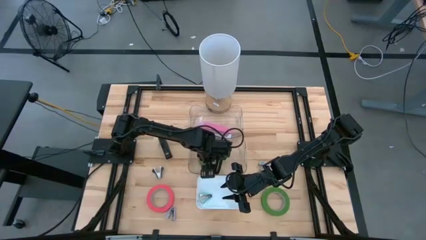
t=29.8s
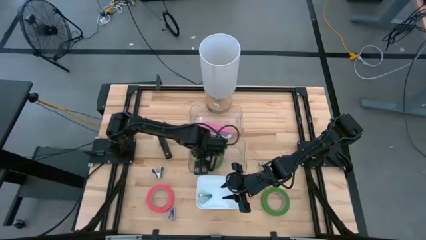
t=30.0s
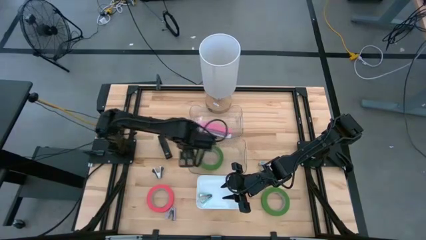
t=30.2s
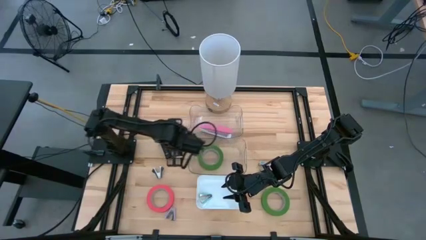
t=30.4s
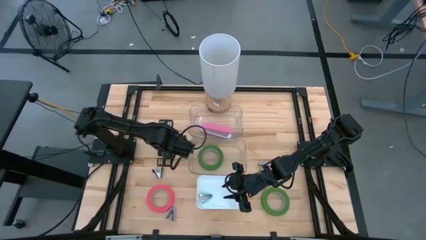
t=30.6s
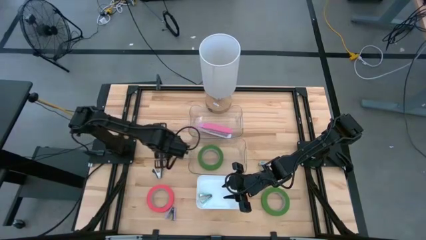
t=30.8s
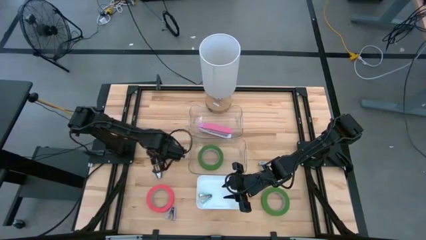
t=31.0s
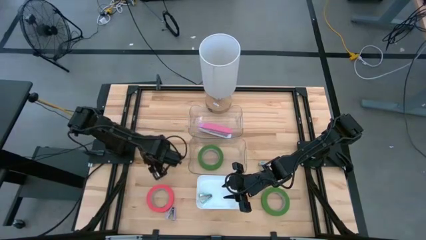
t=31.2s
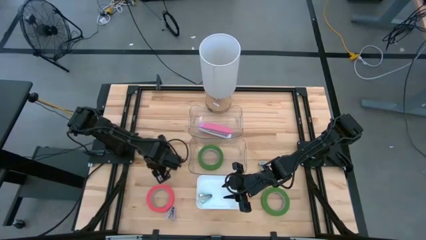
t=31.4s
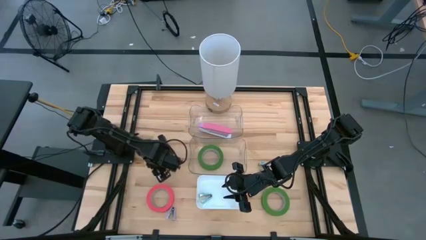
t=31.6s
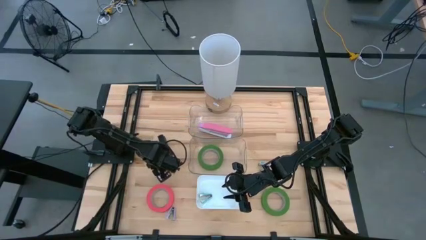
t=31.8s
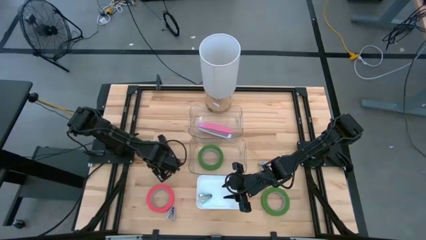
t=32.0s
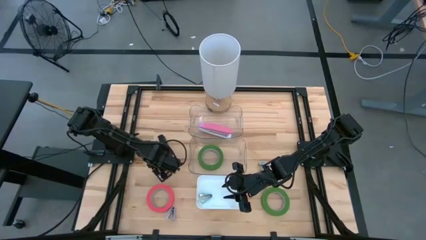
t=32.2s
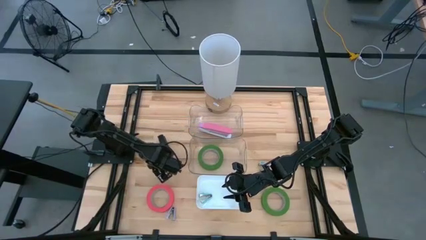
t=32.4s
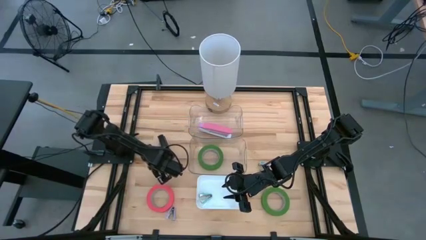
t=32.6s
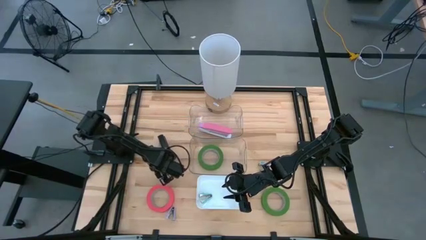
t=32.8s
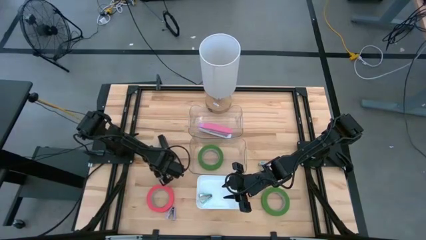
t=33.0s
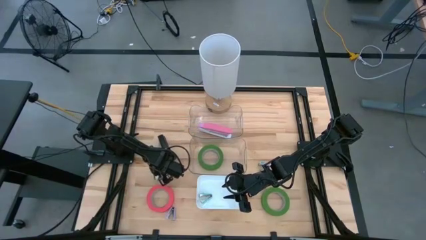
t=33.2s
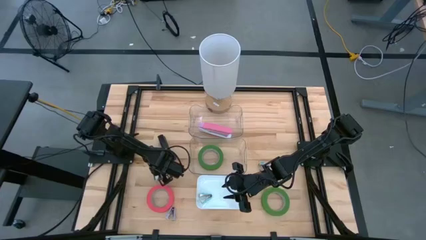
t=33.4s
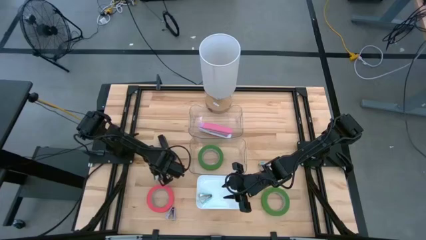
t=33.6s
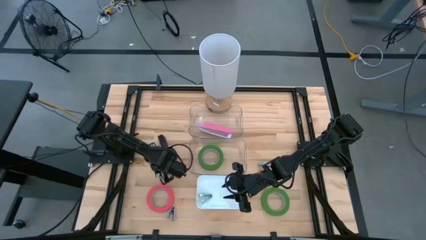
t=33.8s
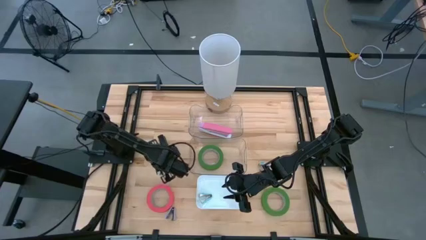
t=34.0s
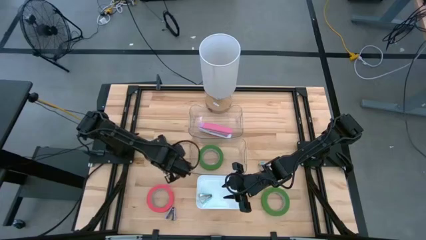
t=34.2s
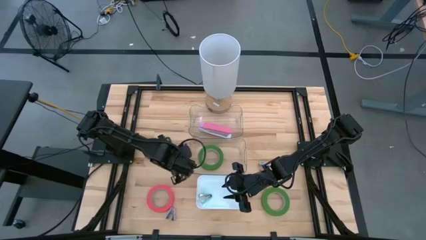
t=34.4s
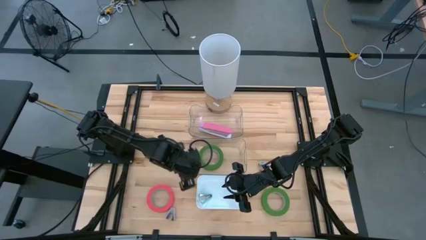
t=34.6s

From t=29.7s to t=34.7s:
Task: Pick and place Stapler, Stapler remover, tape
Put the black staple remover into the white bin

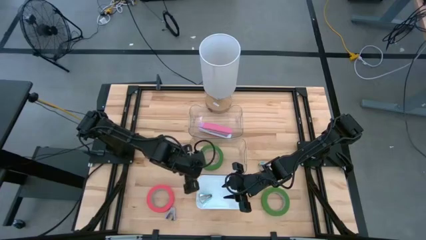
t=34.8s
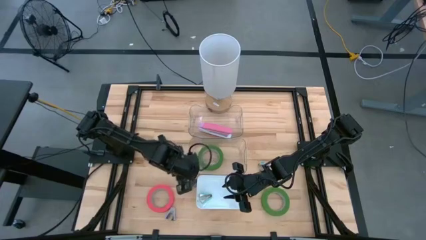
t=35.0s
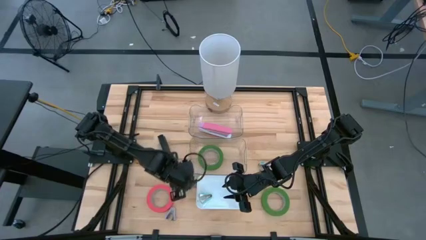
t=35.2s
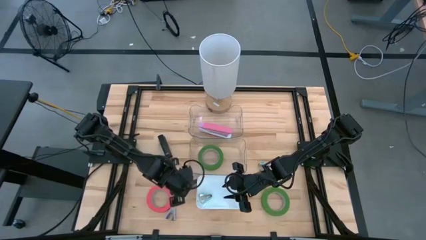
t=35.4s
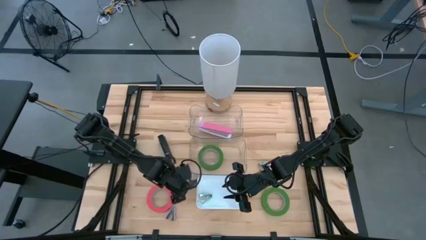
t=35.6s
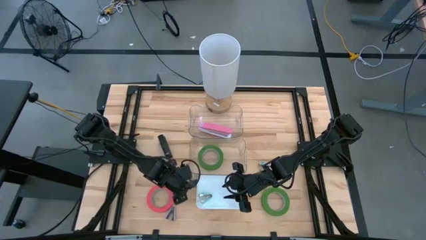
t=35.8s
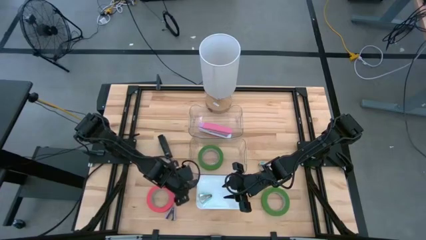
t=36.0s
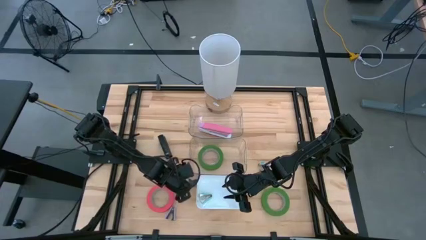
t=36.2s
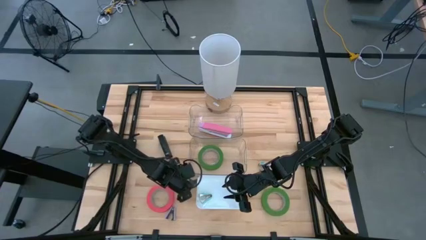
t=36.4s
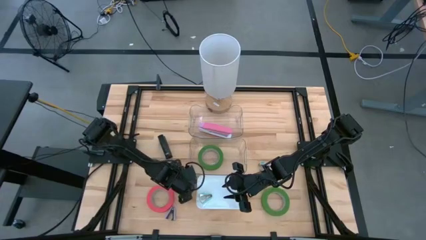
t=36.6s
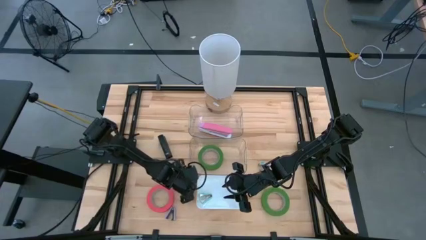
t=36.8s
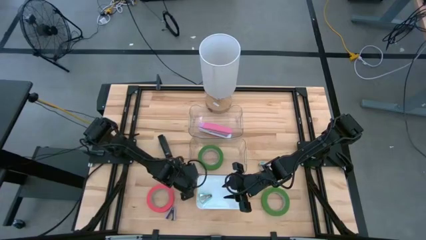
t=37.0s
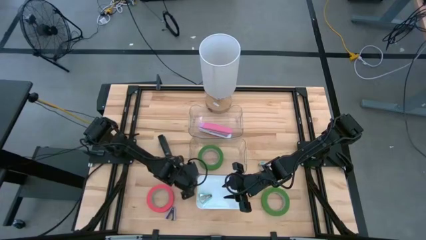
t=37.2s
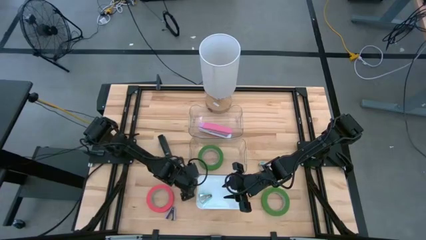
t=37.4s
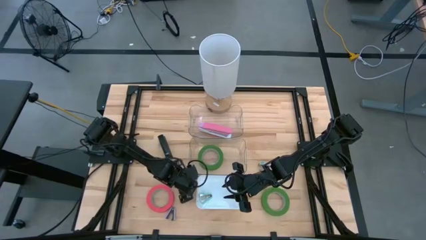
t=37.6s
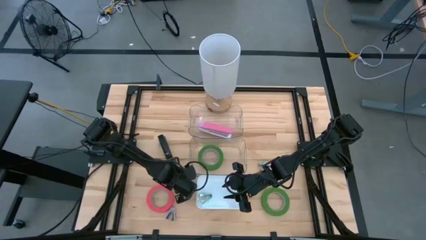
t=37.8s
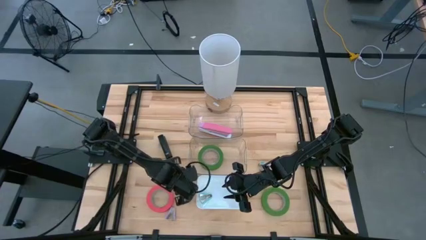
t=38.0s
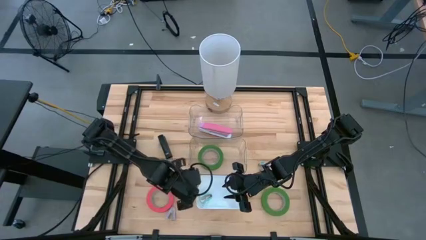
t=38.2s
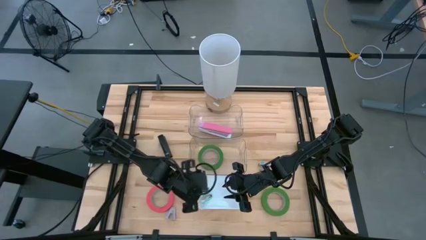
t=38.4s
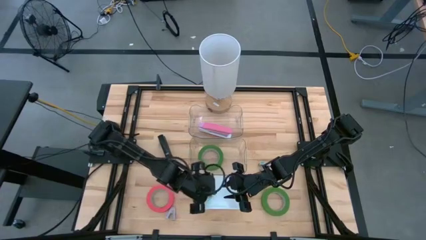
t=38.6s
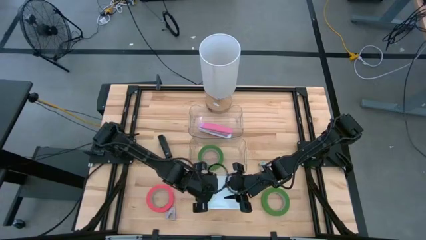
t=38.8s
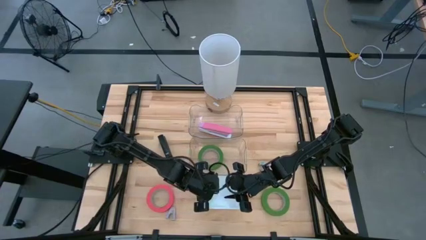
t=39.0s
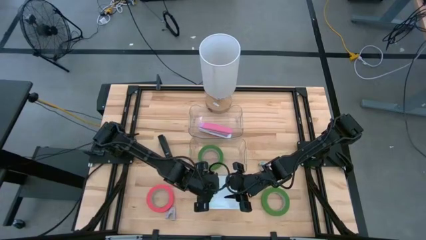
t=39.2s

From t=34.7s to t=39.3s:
Put the black staple remover into the white bin

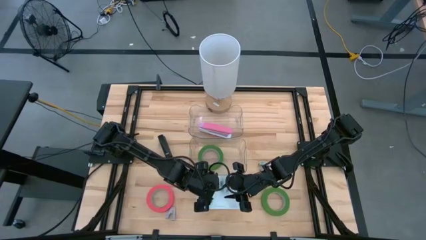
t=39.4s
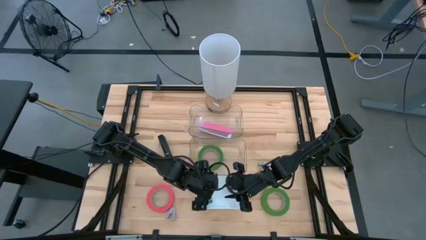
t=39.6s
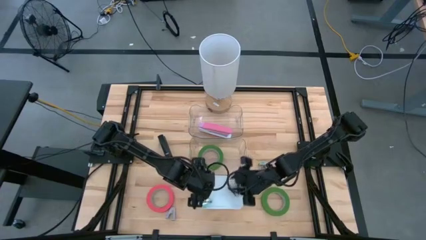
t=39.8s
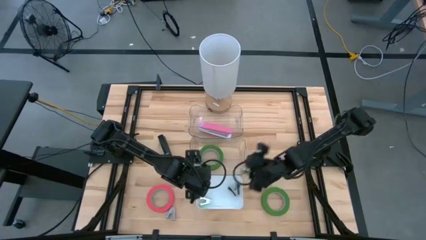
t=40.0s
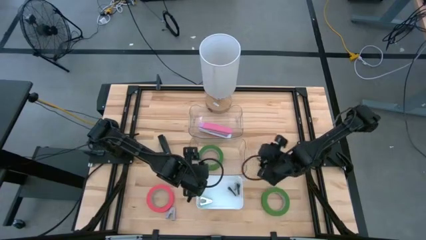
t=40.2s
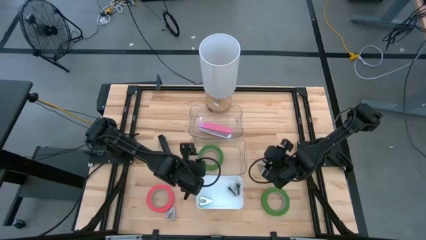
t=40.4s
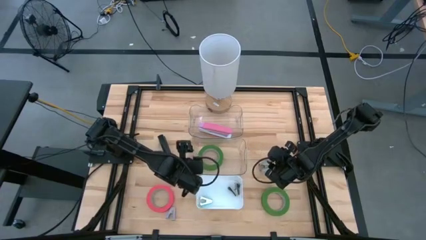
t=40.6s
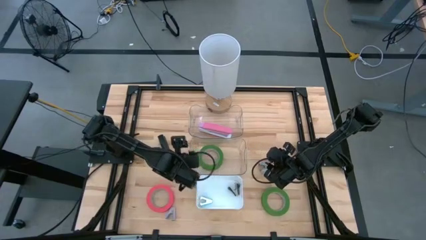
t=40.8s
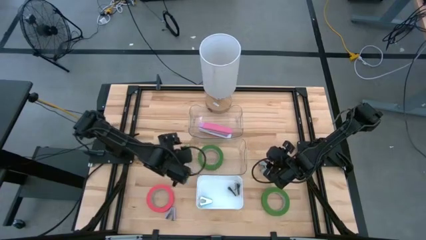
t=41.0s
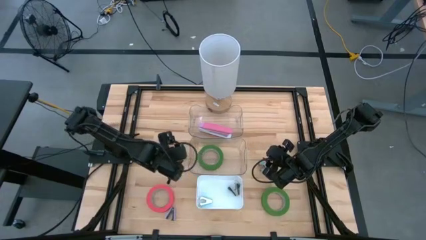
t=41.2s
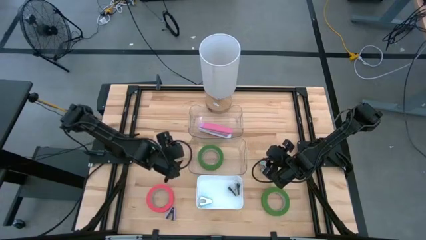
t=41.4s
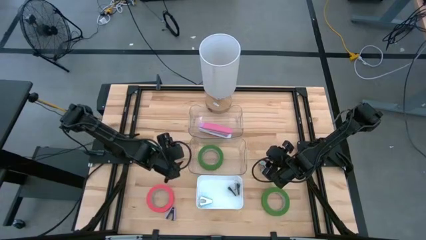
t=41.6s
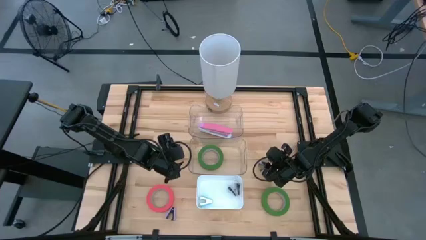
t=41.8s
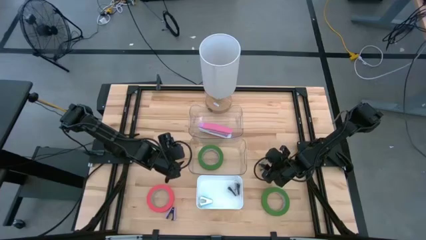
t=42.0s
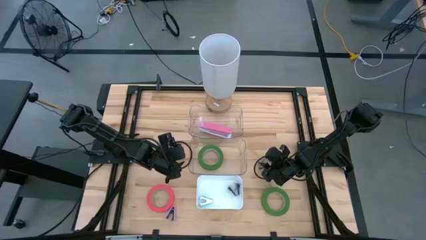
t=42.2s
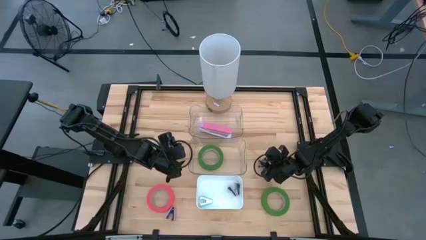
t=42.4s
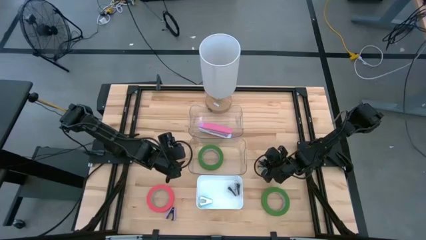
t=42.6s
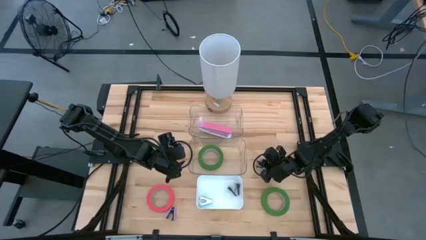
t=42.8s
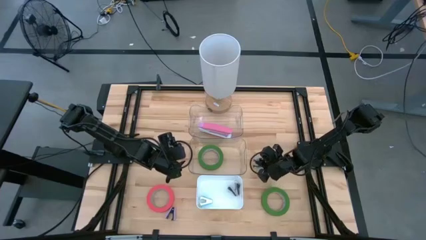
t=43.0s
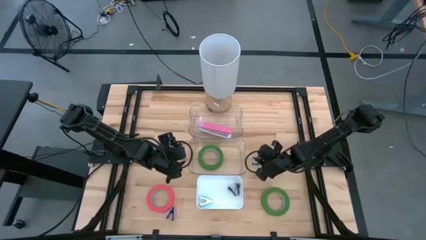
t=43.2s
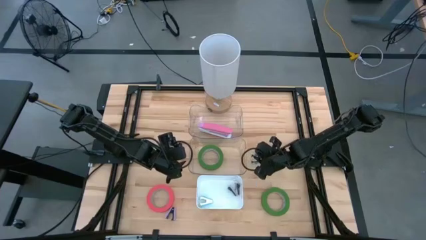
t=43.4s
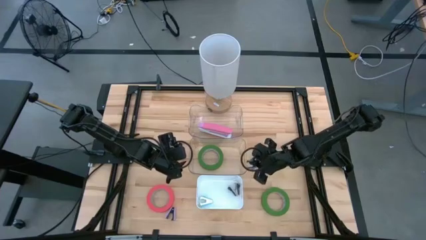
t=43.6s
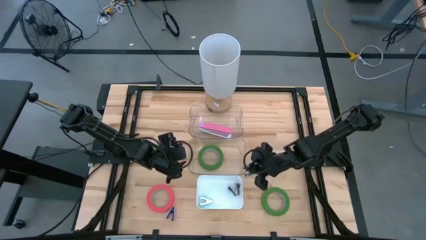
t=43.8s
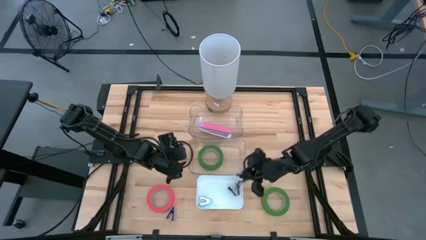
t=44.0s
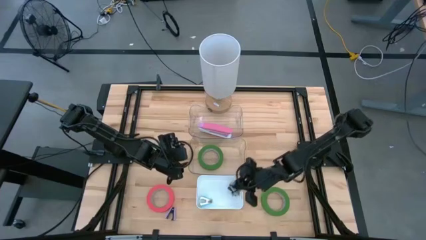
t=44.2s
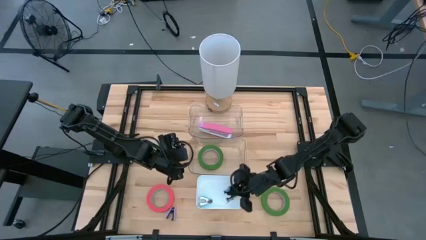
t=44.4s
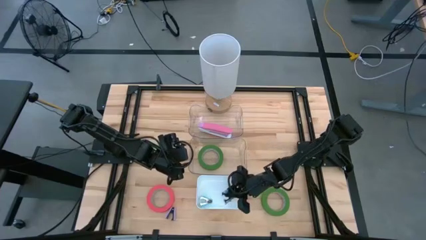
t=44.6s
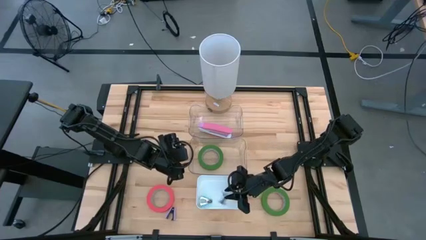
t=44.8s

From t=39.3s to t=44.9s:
Put the gray staple remover into the white bin
